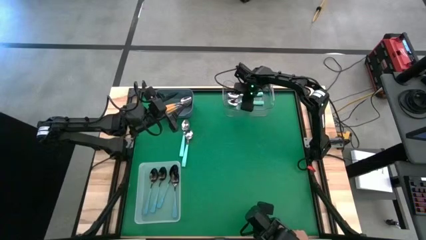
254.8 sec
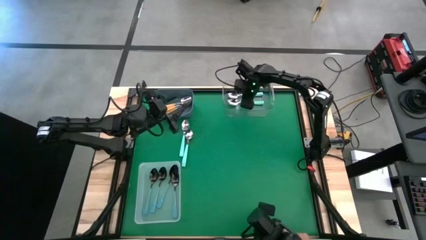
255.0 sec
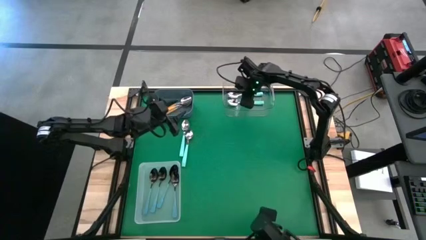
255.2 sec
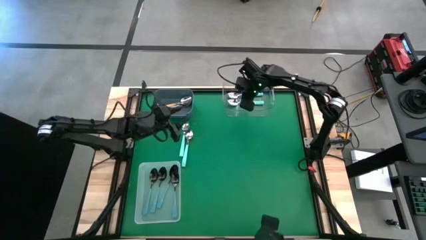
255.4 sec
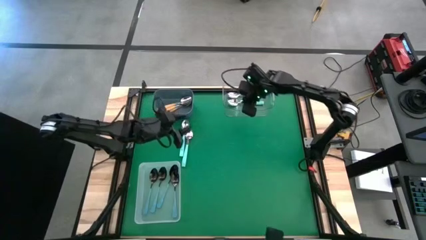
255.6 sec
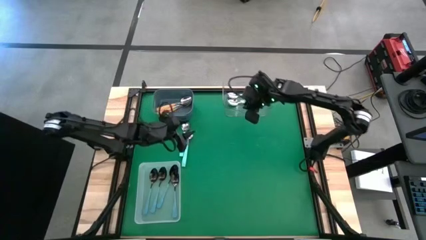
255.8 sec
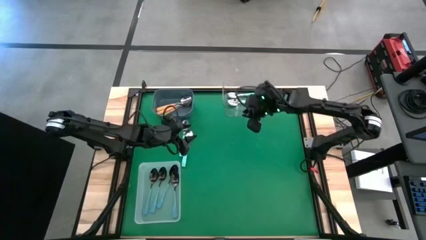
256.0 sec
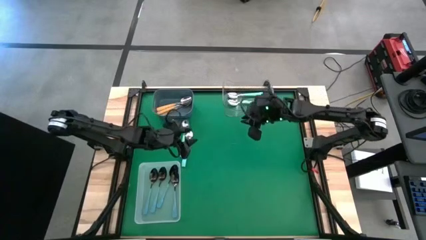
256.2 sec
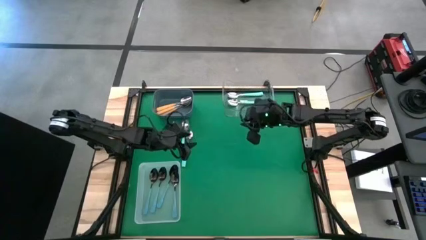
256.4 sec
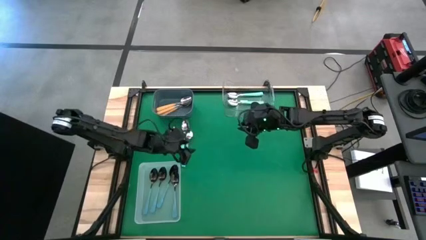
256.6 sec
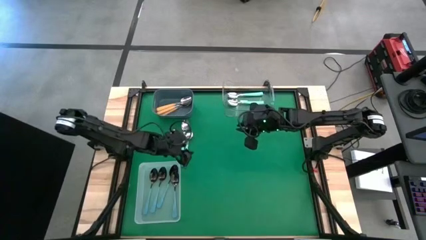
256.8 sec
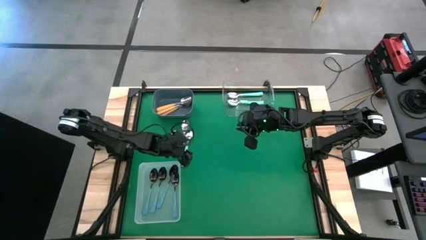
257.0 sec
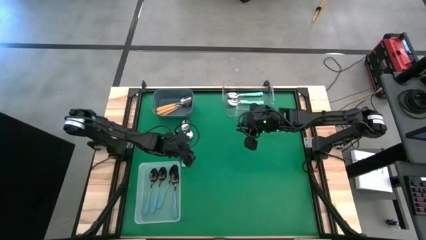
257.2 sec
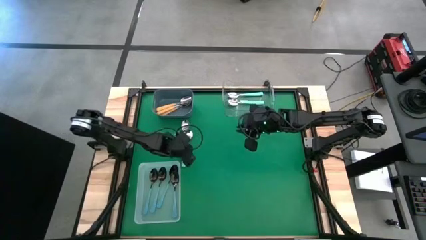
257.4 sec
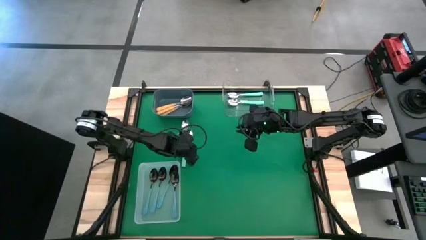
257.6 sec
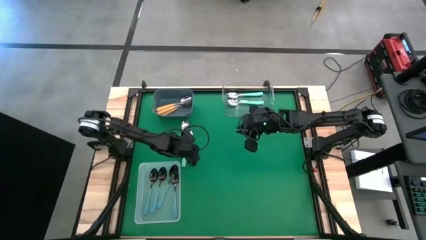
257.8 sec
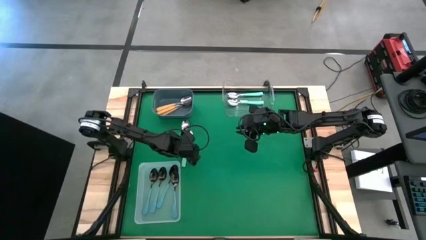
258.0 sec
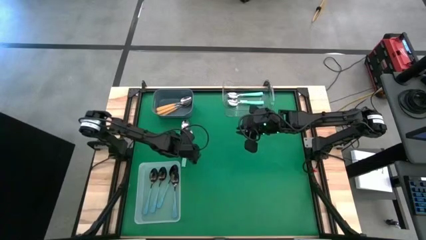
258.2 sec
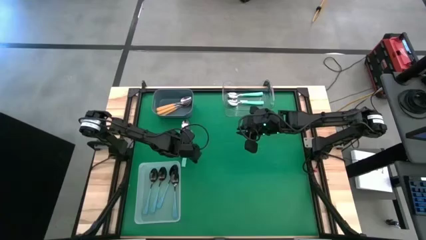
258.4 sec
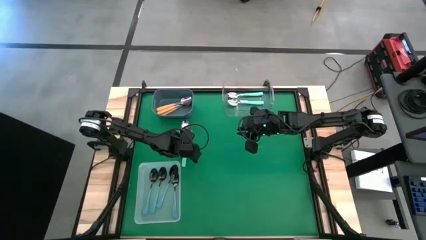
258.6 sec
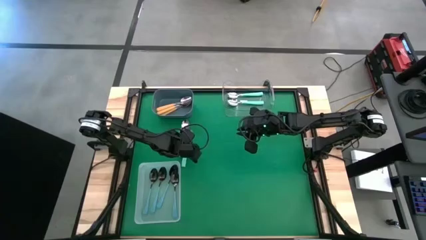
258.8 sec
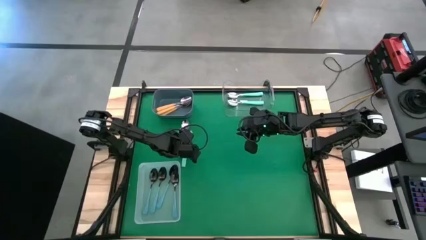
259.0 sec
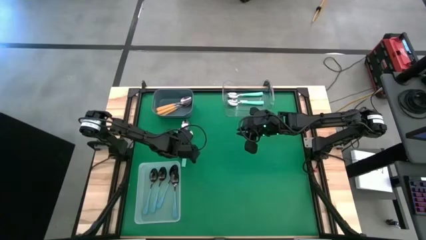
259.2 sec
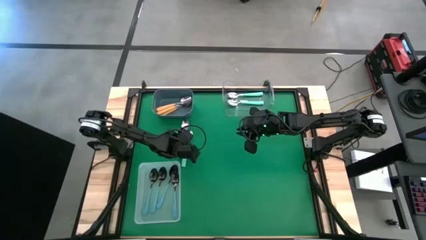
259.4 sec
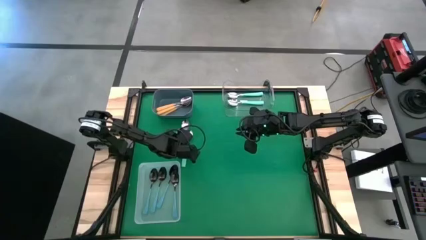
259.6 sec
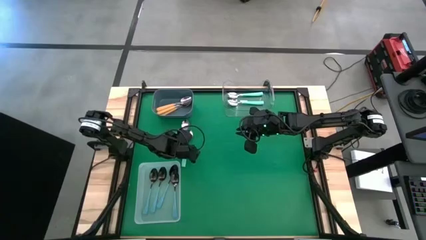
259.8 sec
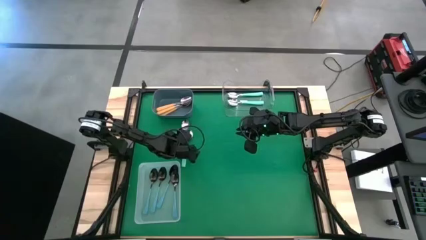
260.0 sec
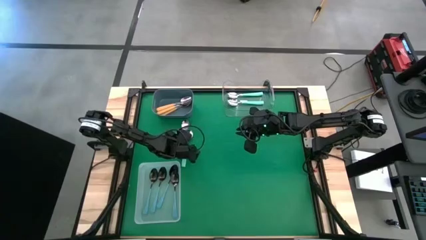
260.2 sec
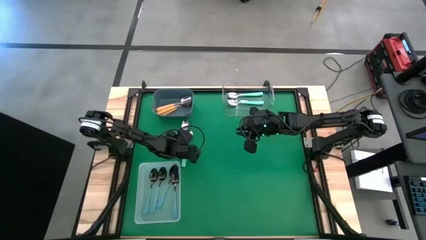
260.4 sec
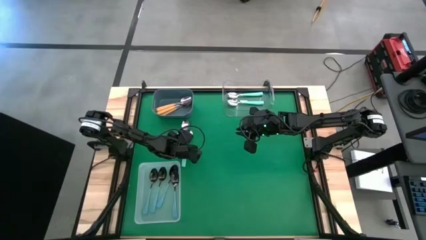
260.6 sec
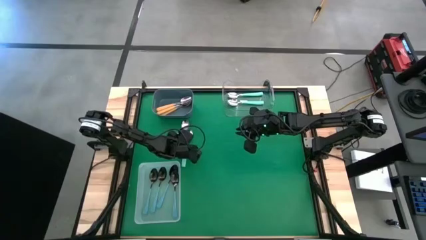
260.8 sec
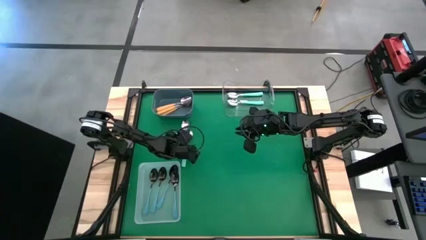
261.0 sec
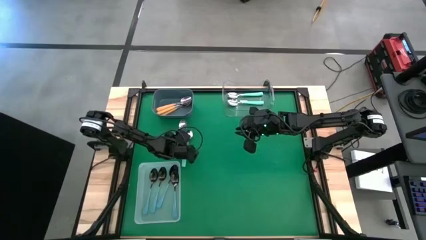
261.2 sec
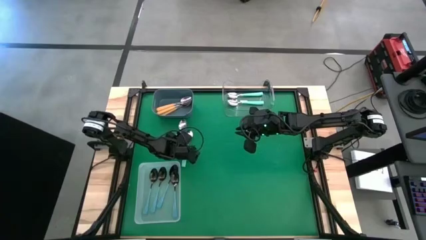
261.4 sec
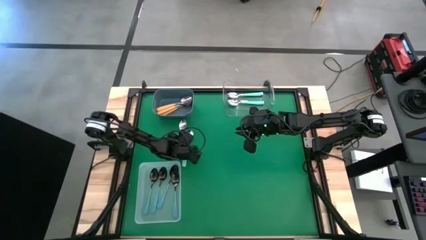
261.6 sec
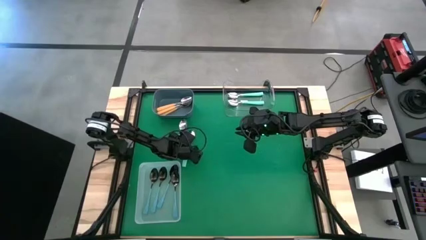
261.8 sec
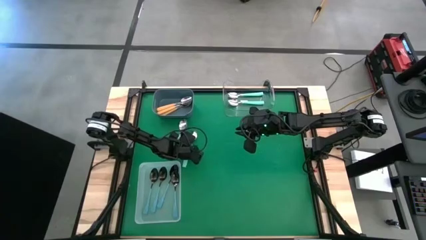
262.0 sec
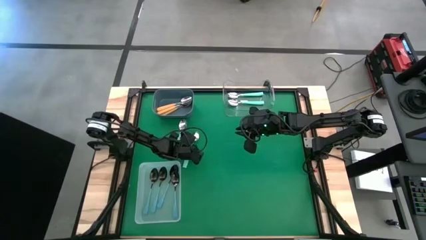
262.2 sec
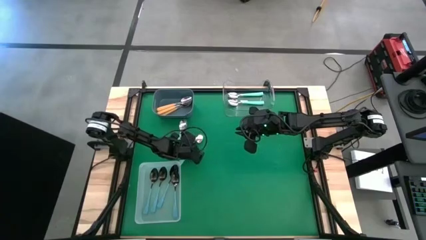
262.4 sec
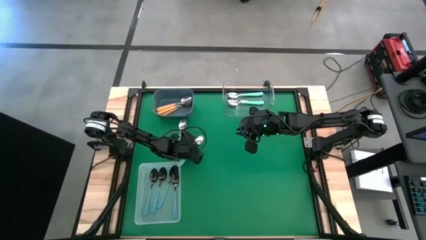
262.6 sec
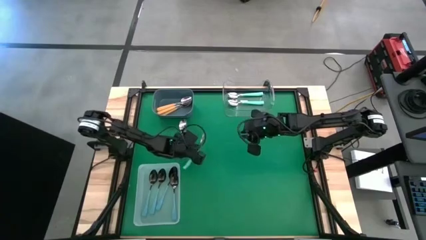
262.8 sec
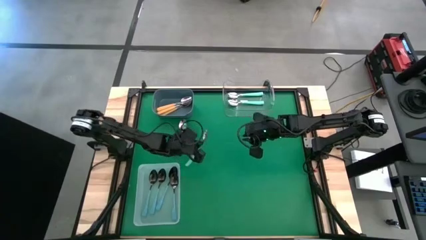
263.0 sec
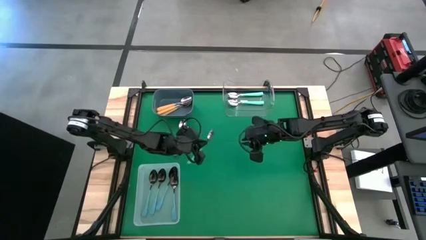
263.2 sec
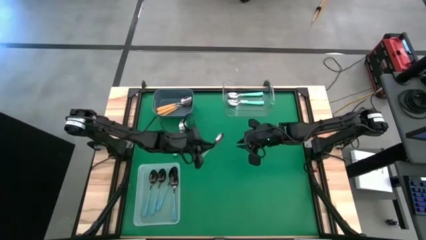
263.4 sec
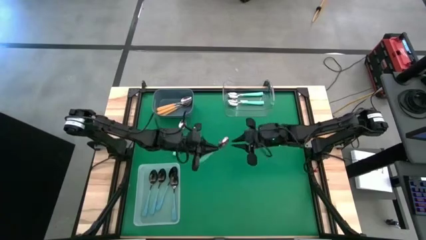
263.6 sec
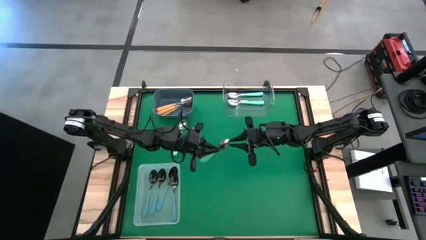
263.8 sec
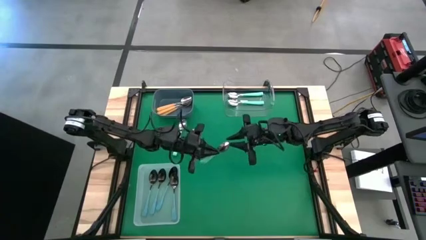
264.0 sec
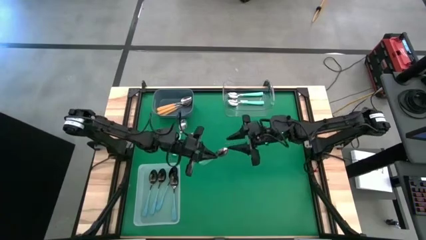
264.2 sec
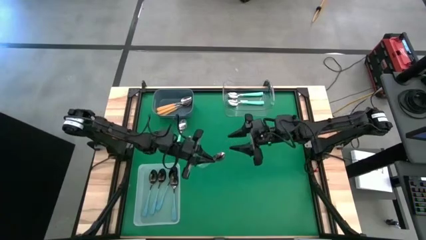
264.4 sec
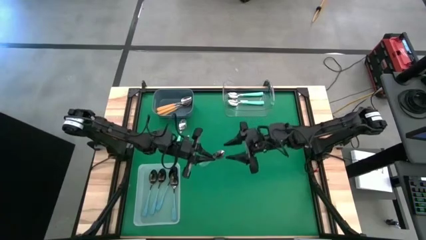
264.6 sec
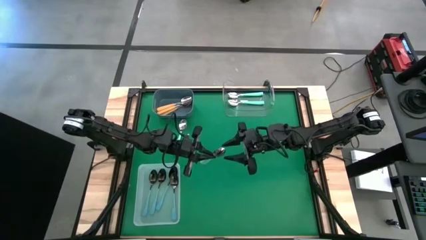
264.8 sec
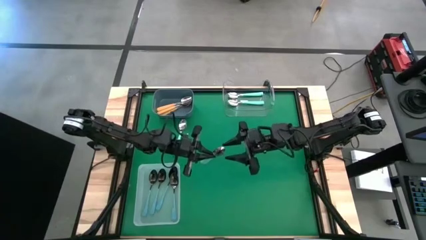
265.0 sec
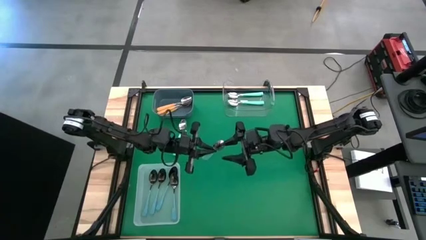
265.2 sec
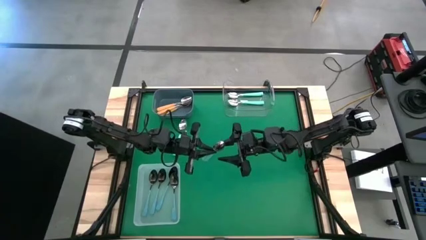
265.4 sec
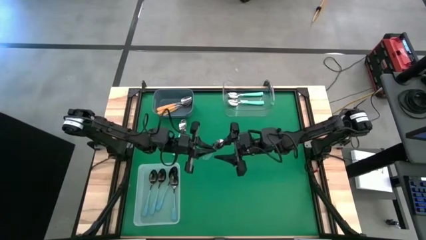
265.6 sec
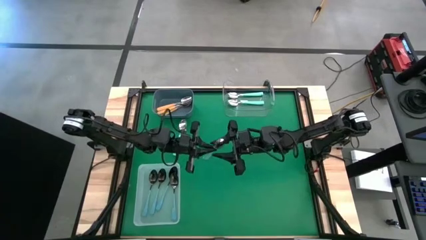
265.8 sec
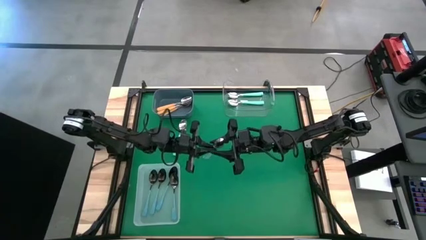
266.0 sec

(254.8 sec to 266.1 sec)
Task: Sort silverware by color (type)
Put the light blue spoon into the transparent bin

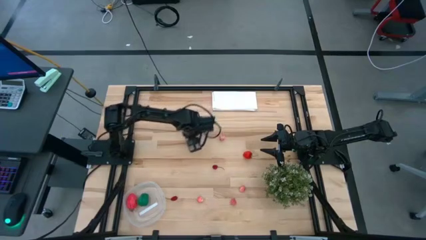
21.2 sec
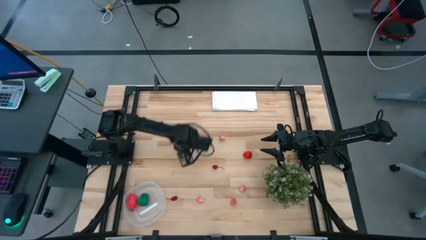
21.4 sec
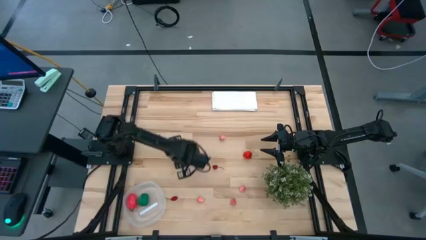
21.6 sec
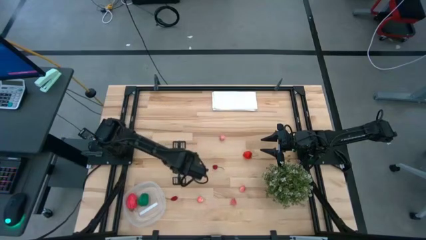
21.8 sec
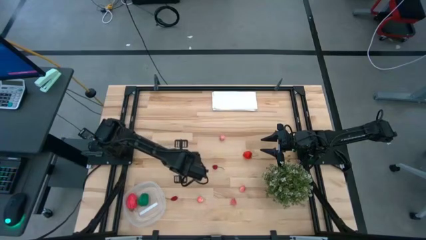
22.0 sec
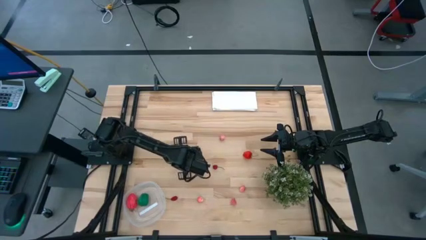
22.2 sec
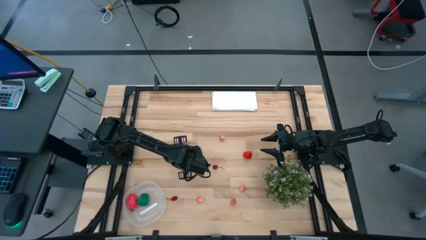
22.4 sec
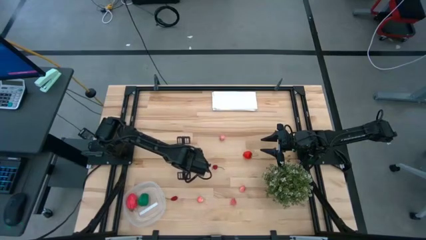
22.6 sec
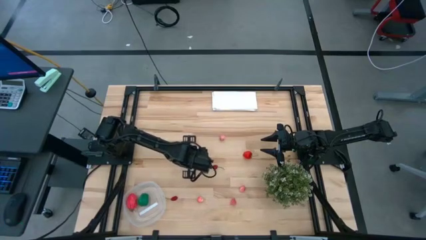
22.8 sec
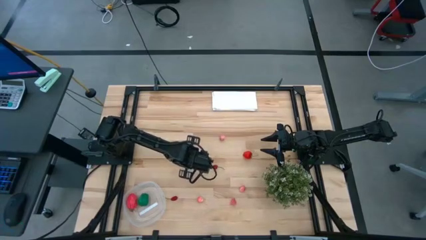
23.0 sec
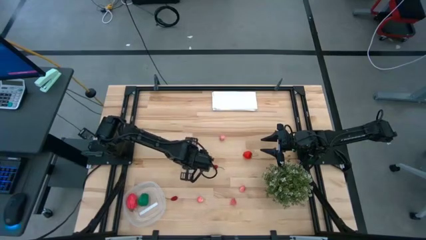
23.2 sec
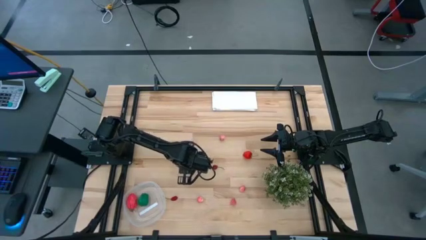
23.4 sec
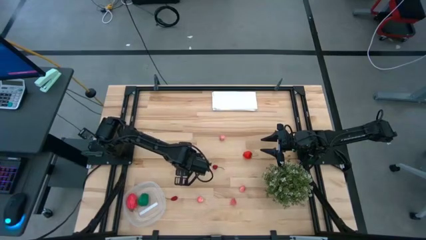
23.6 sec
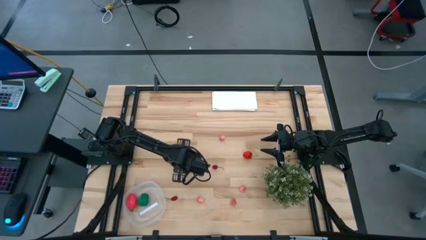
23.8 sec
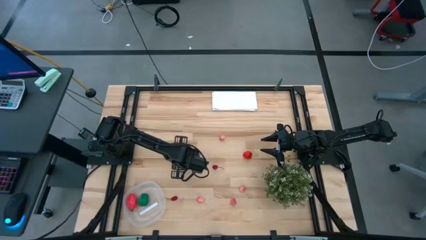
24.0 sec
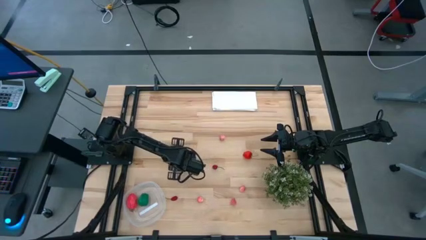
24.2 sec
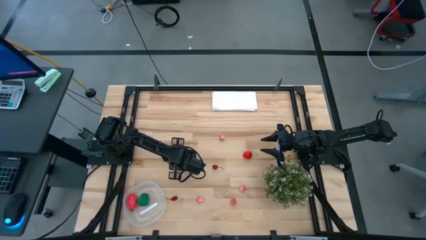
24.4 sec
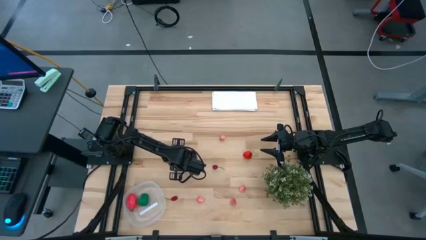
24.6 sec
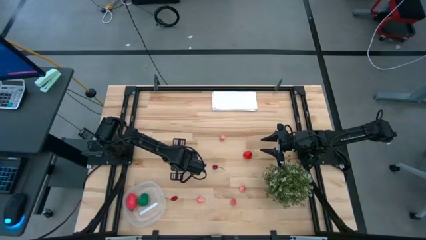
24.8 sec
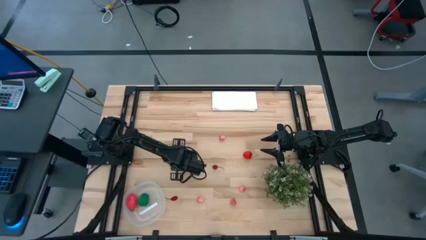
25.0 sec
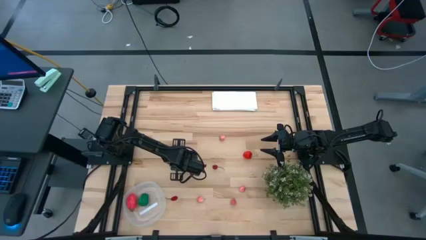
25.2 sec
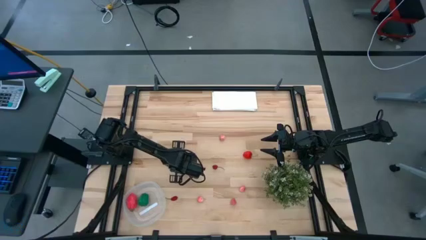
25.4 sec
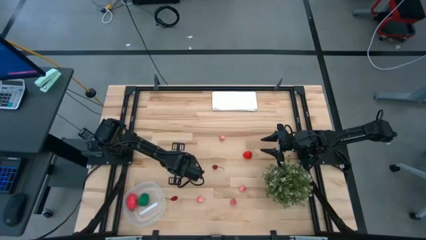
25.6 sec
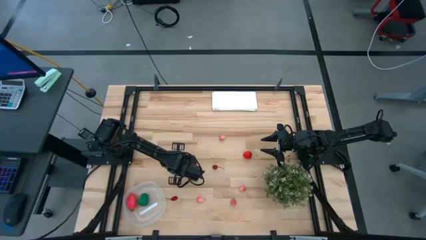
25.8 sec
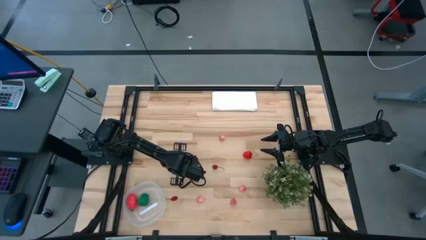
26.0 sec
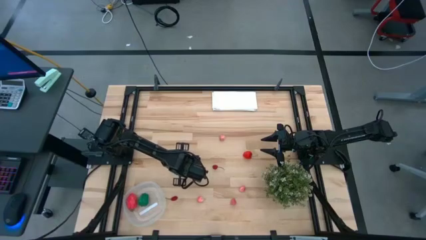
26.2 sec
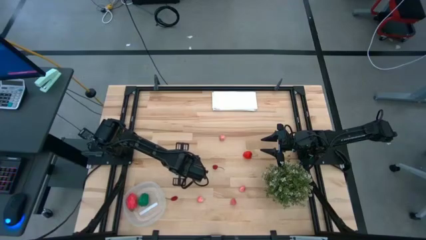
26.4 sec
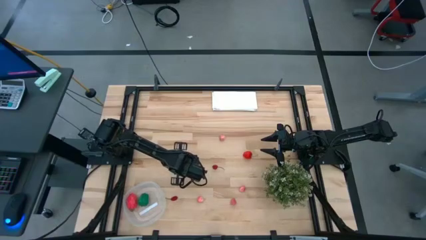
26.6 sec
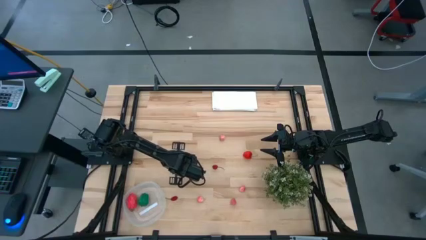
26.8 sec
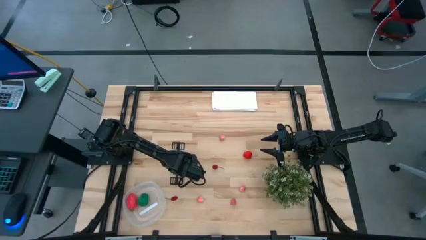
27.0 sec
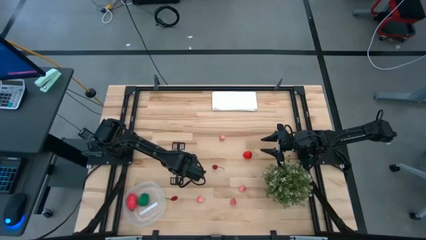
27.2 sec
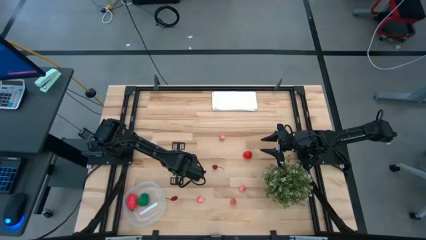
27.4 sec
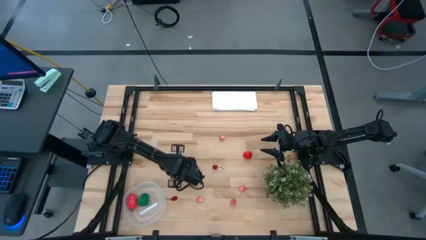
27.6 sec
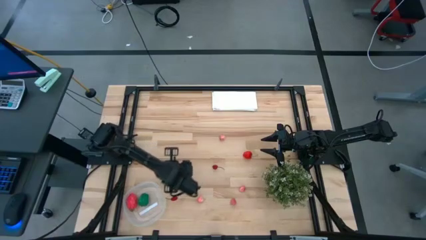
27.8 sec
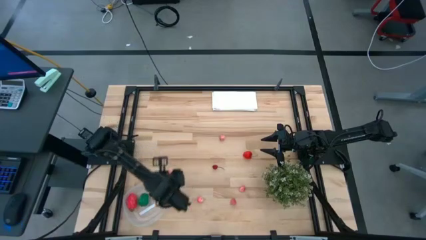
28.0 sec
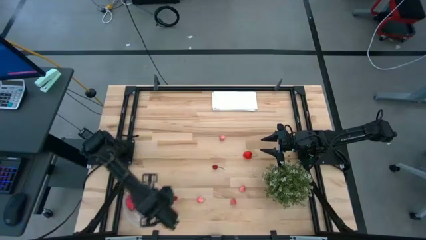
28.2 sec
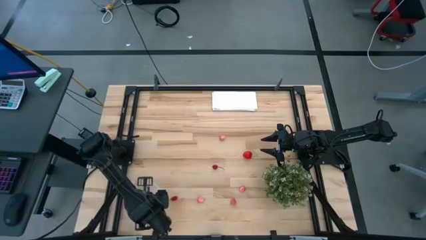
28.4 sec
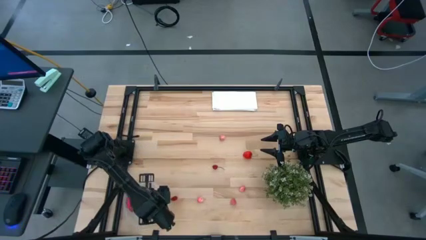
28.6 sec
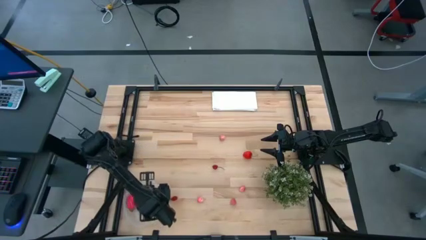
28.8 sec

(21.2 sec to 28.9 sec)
Task: Pick and placing Produce into tupperware
Put the strawberry into the transparent plastic container
